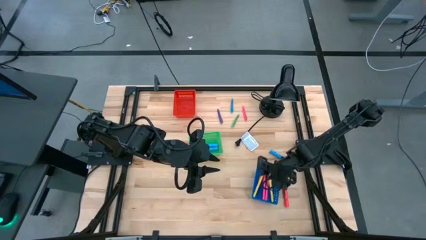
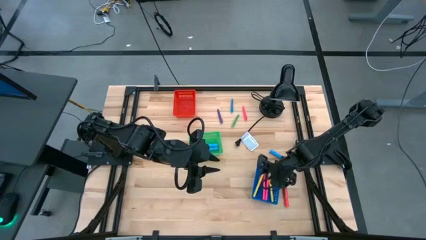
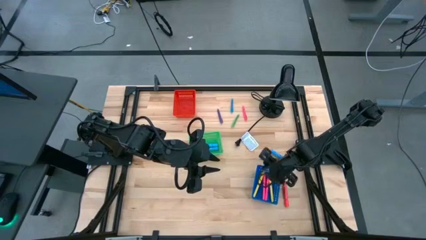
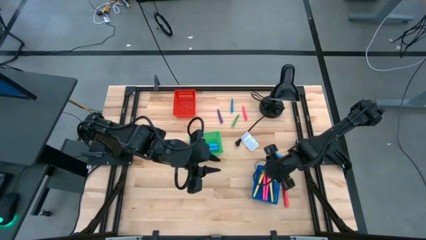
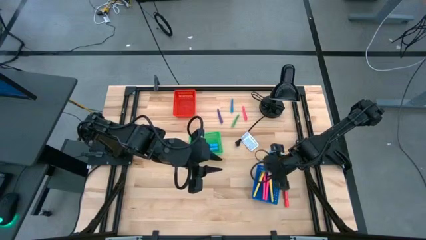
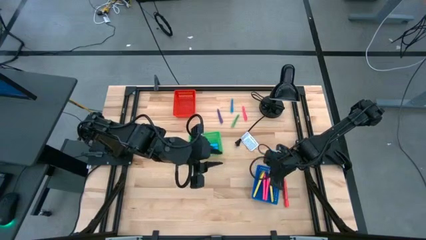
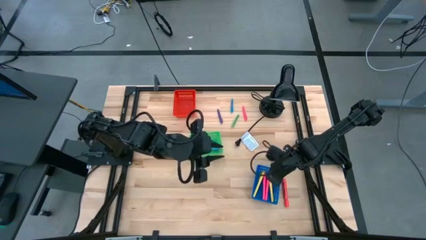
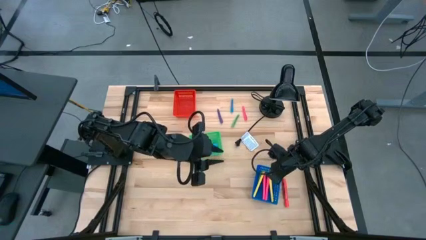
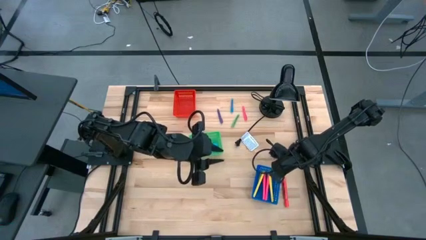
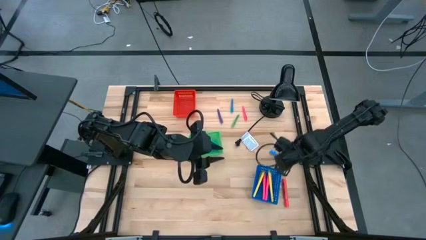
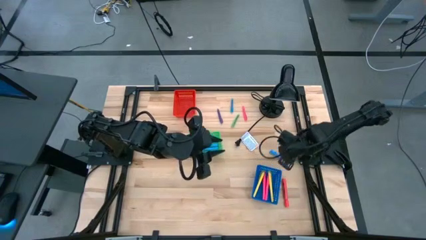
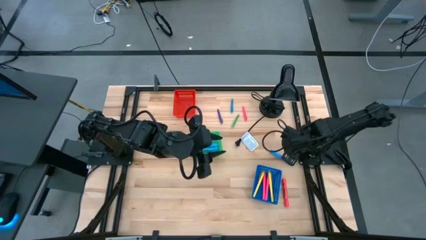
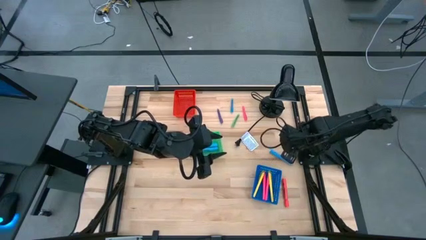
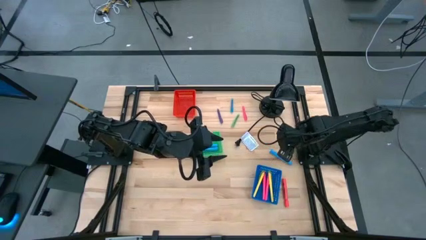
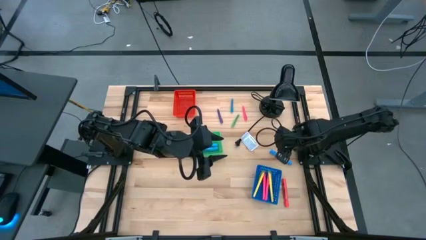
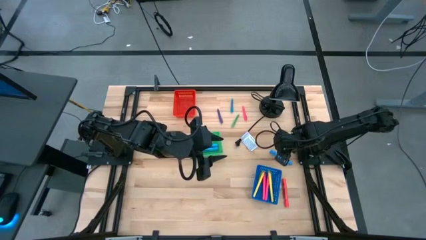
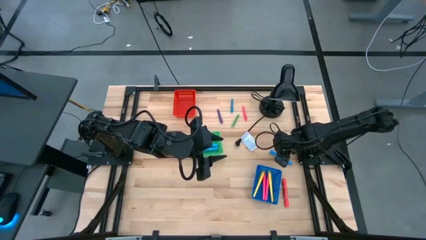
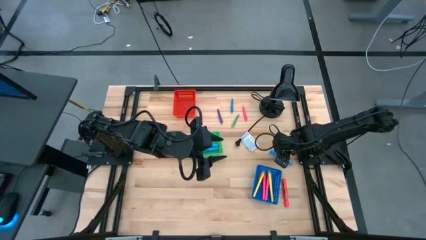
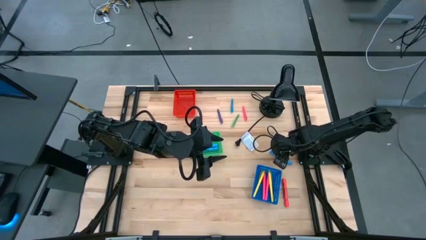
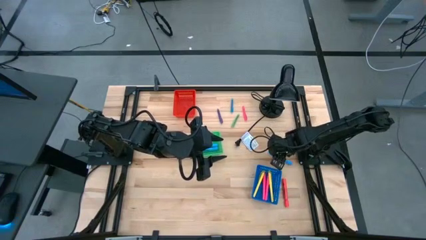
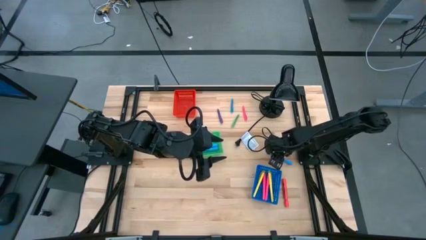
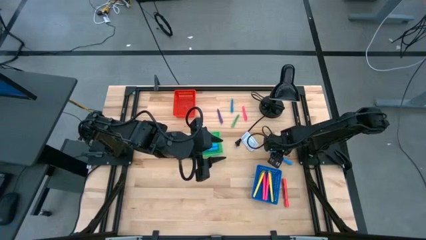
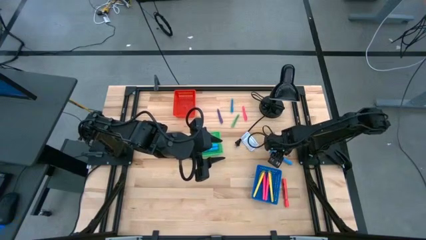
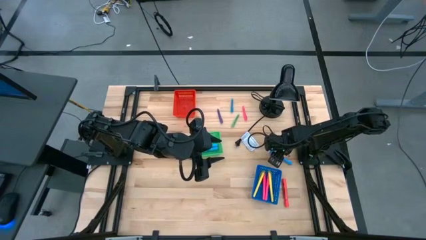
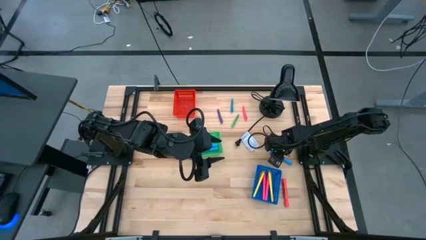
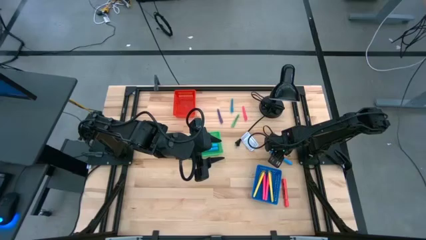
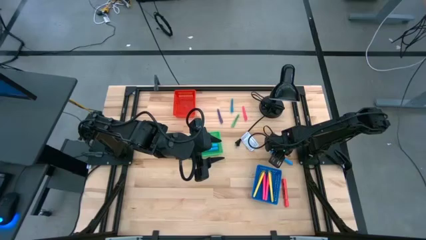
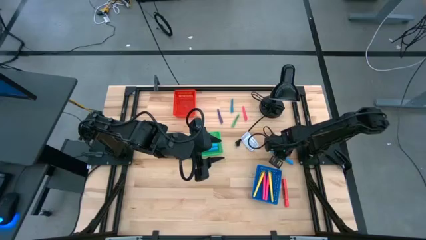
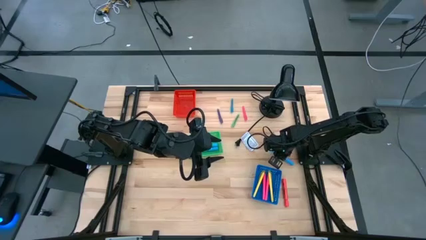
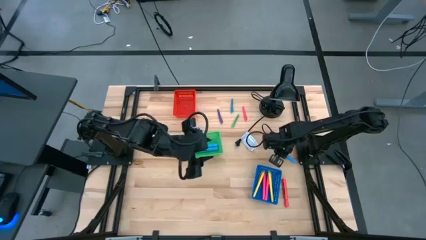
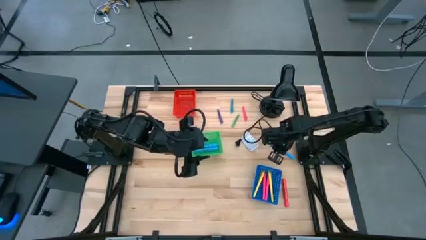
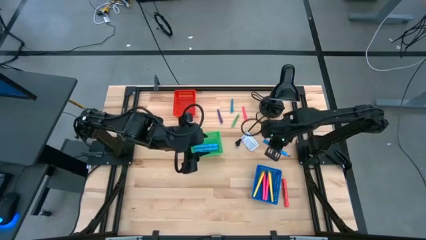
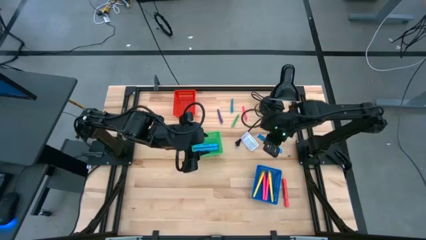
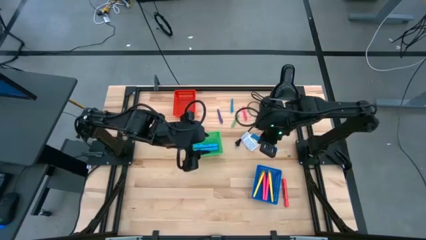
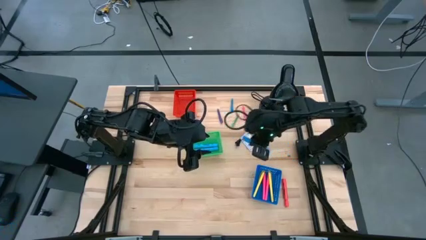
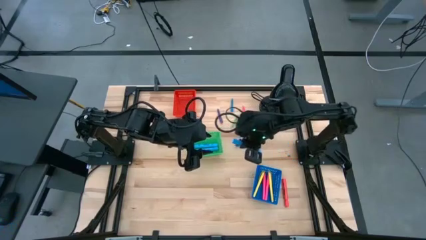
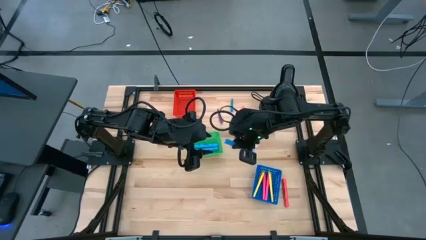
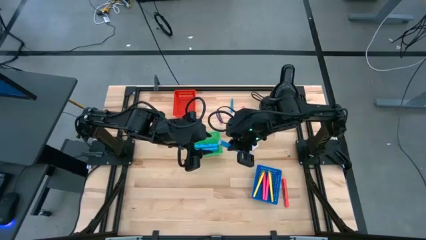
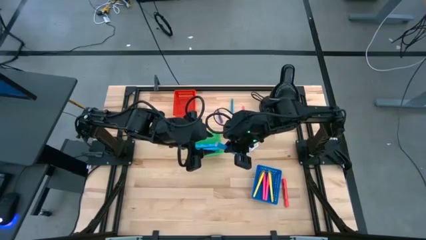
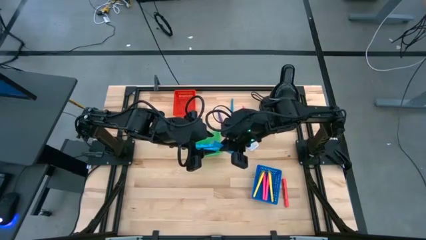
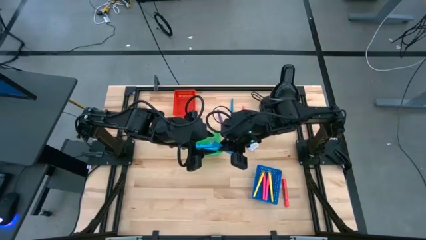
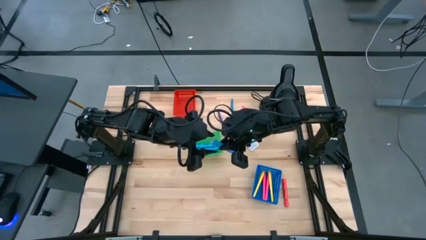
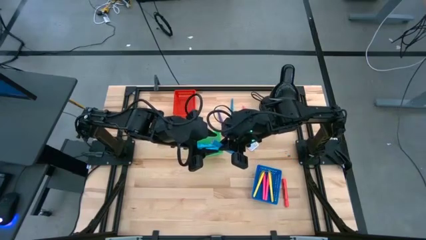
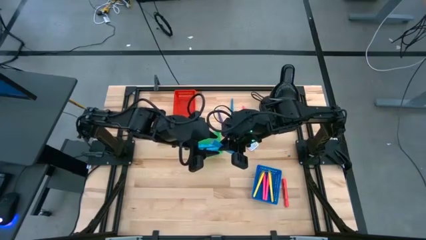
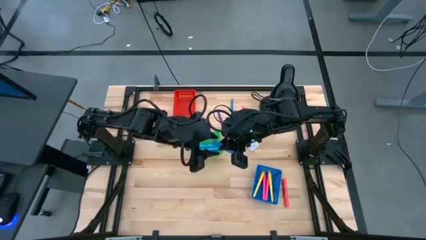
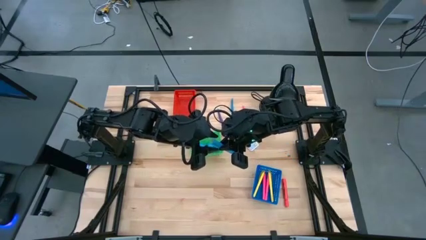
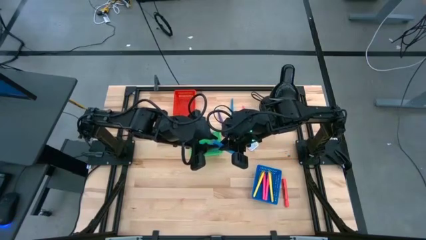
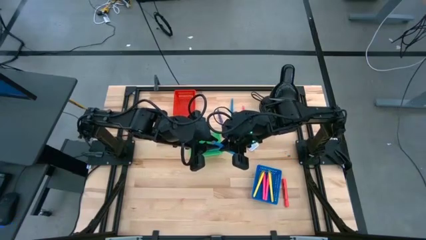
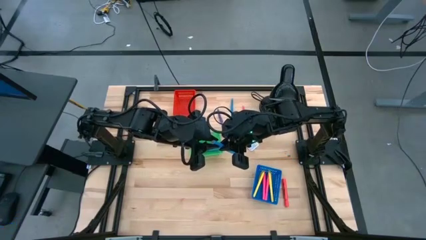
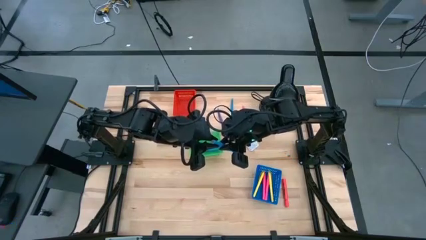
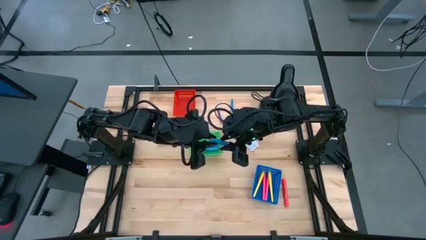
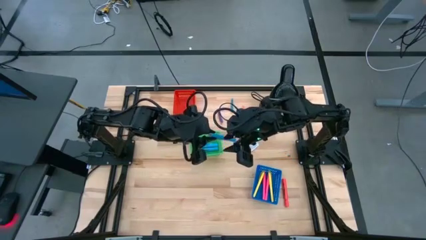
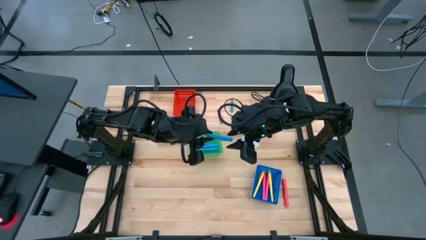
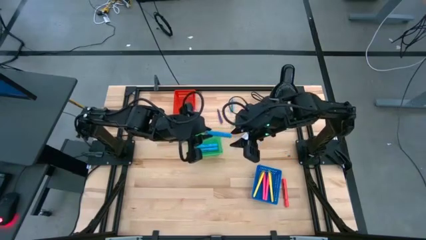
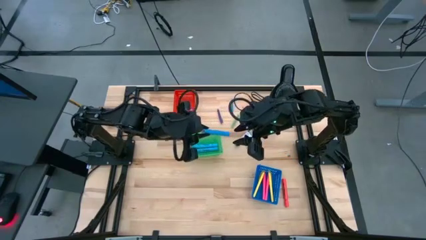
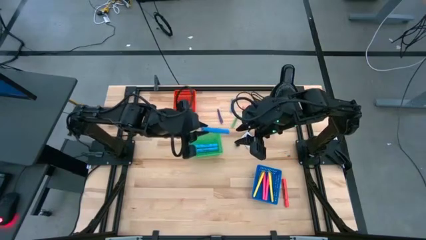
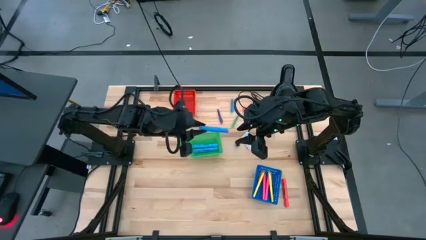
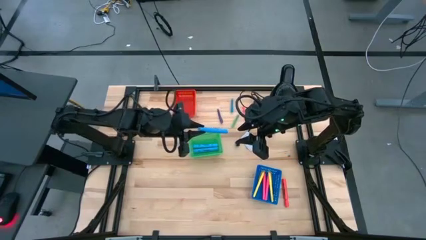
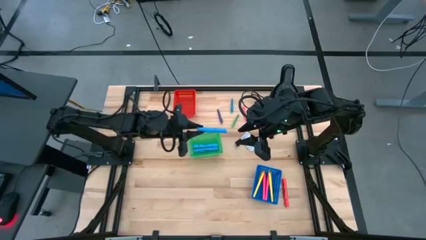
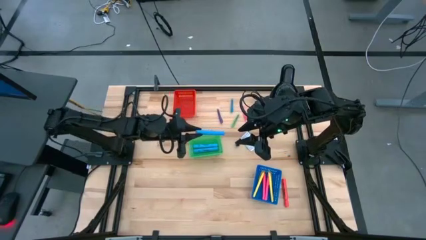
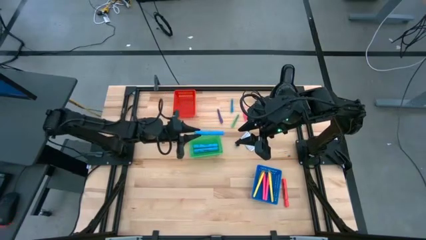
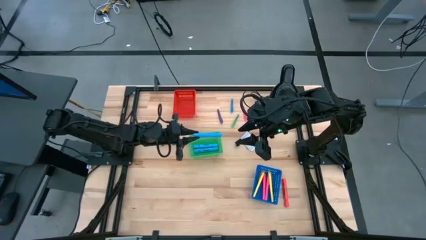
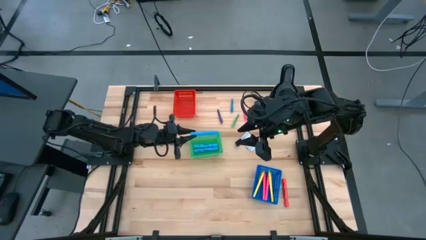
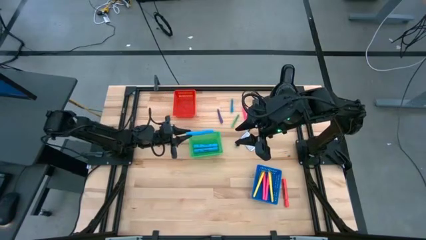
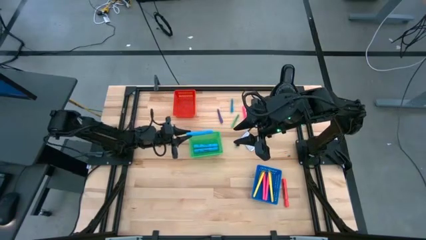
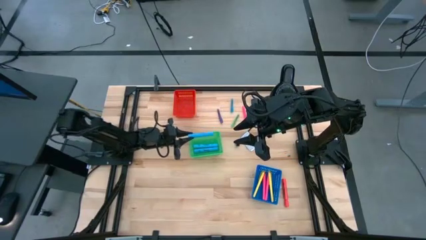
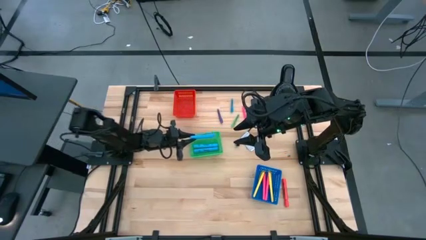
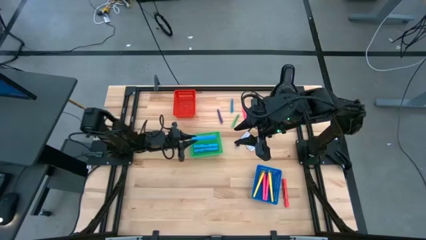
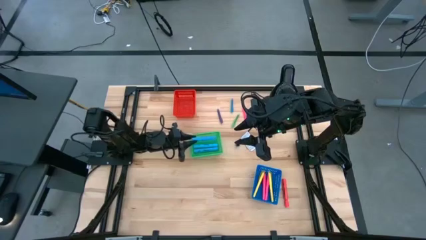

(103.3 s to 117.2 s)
Task: Pick & Place Markers
Put the blue highlighter pen into the green bin

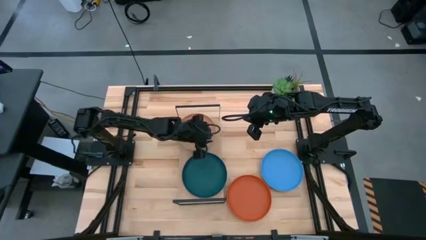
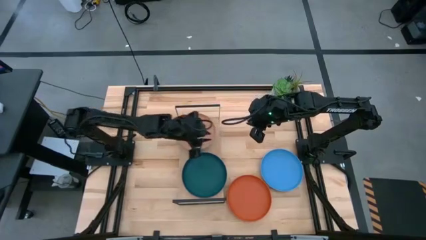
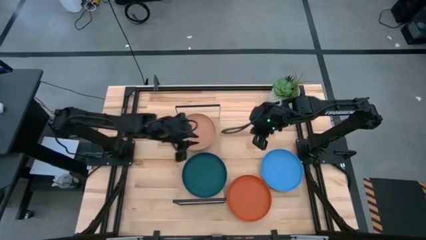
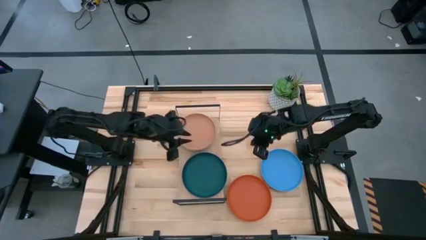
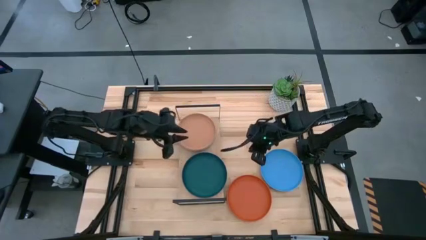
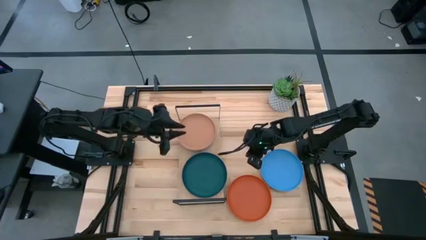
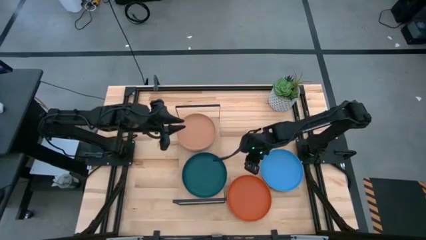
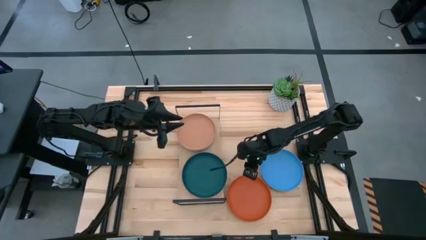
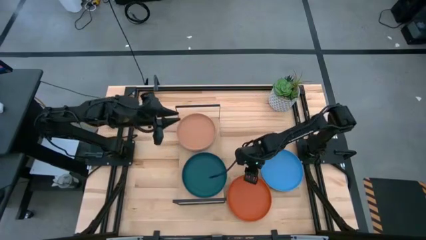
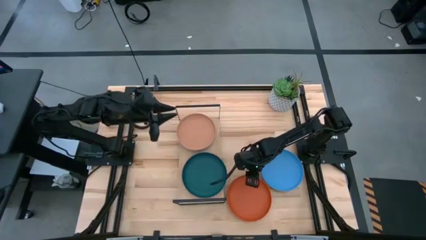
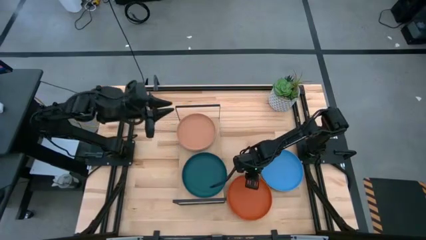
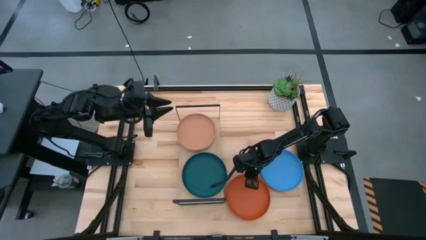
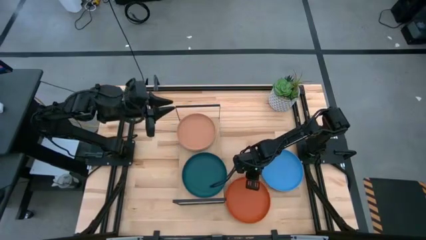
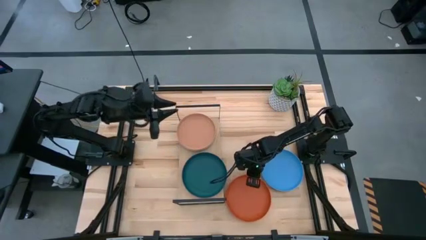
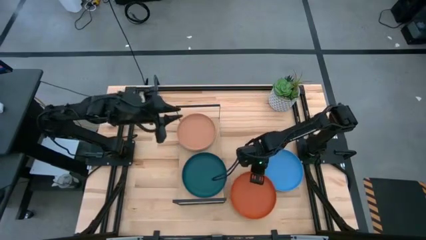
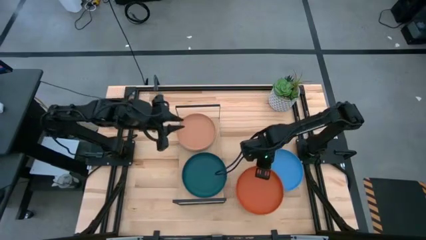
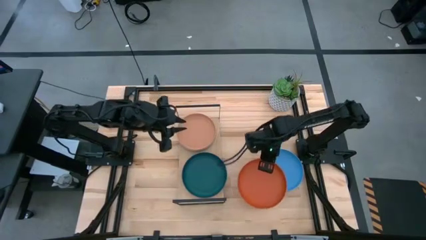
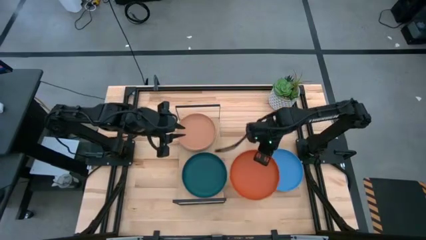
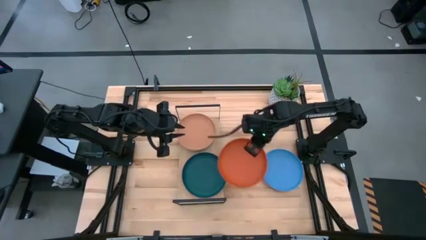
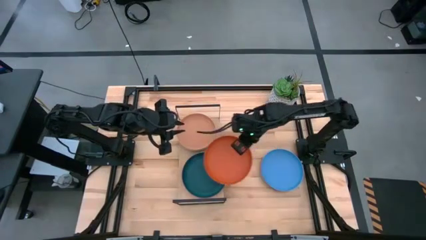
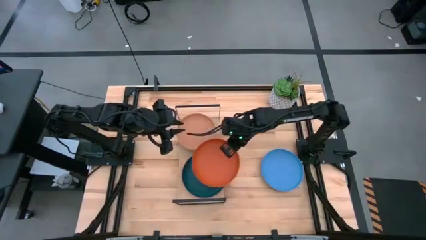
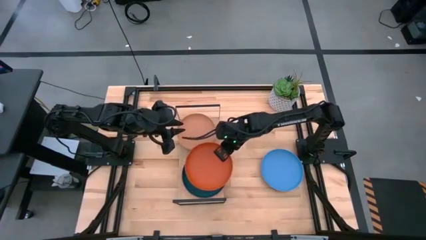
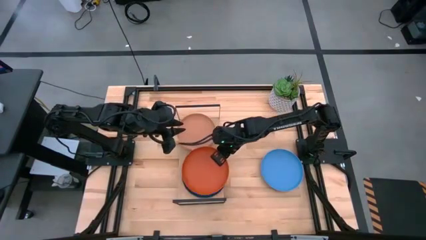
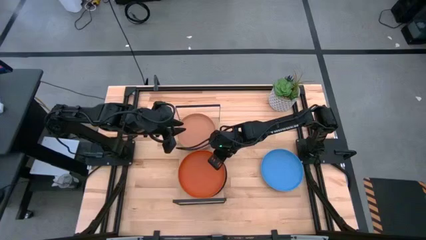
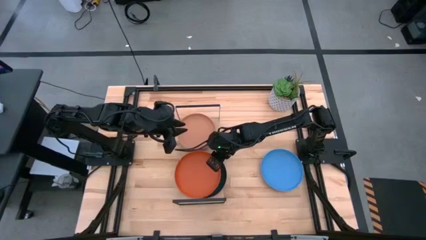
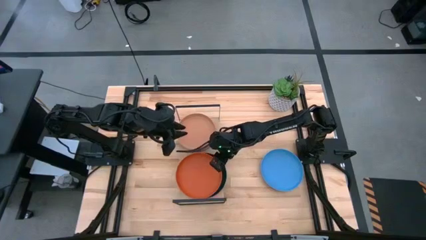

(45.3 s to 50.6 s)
Task: Place and stack plates onto a shelf
Stack the orange plate on top of the dark green plate on the shelf
